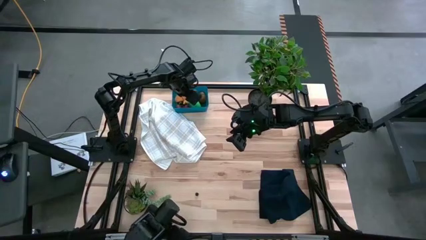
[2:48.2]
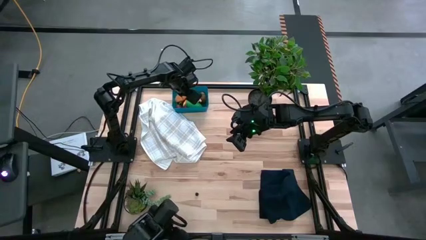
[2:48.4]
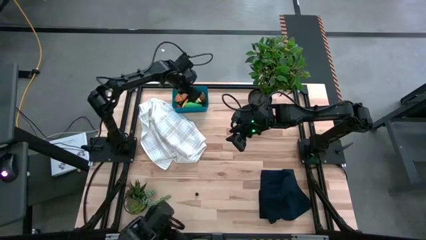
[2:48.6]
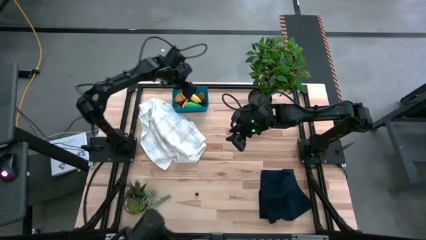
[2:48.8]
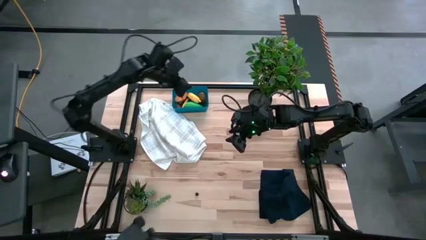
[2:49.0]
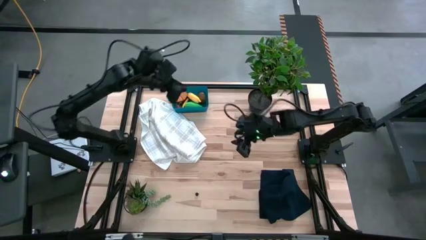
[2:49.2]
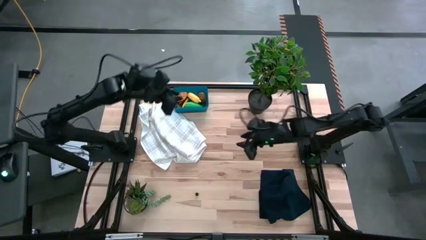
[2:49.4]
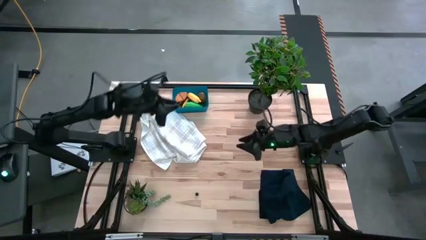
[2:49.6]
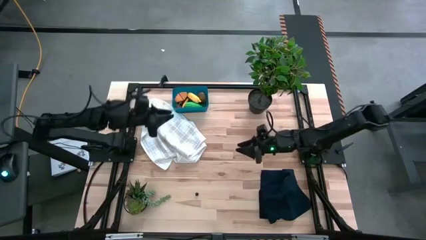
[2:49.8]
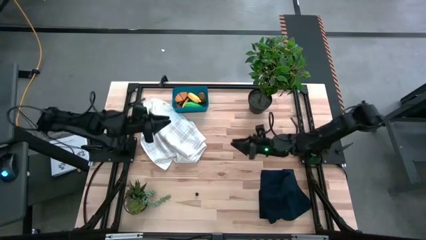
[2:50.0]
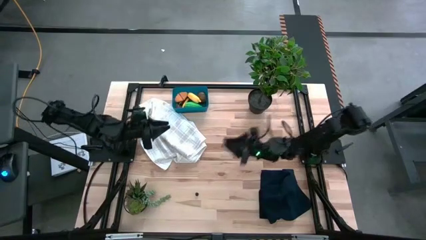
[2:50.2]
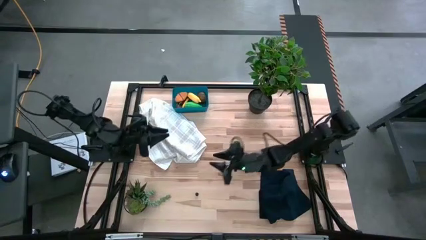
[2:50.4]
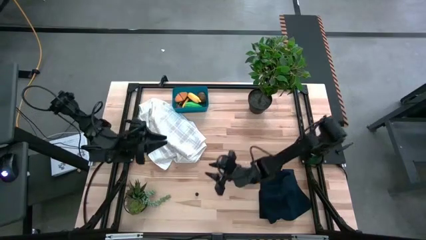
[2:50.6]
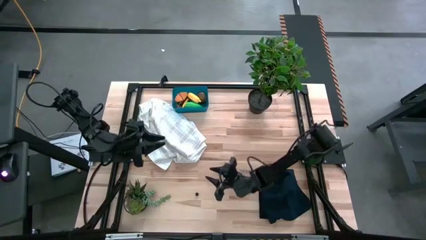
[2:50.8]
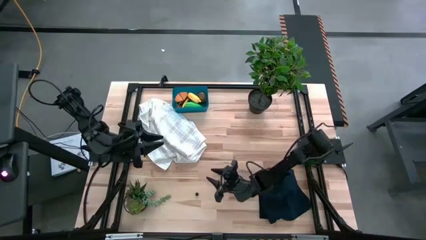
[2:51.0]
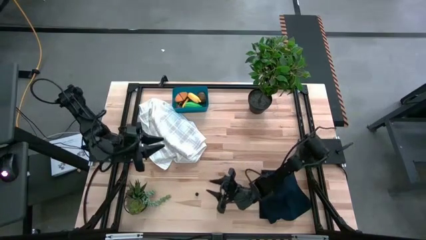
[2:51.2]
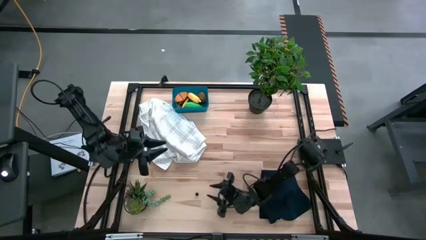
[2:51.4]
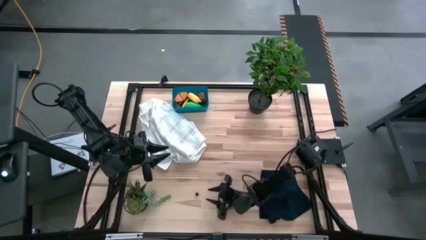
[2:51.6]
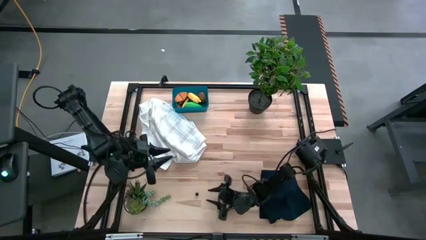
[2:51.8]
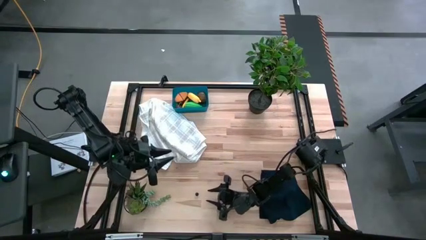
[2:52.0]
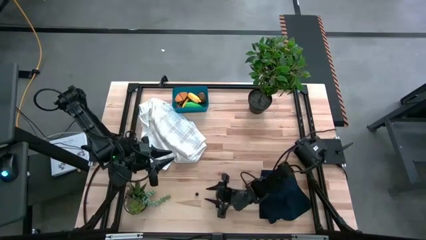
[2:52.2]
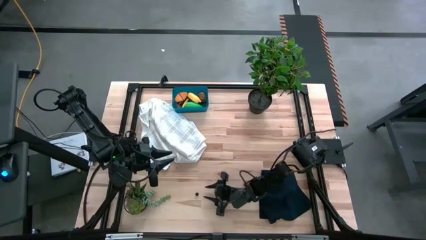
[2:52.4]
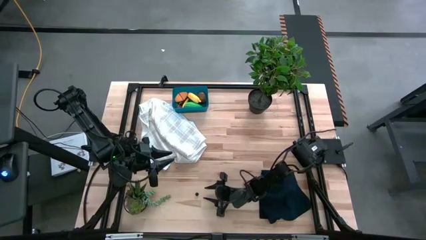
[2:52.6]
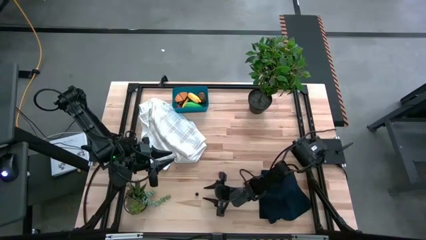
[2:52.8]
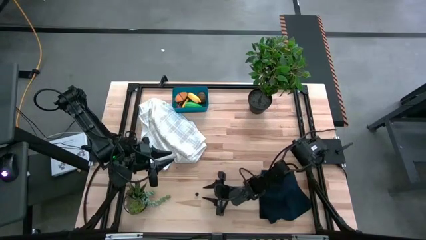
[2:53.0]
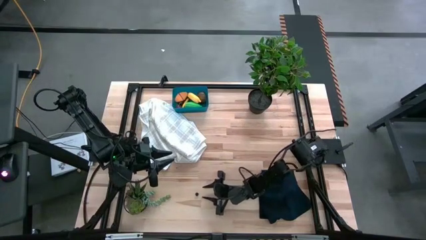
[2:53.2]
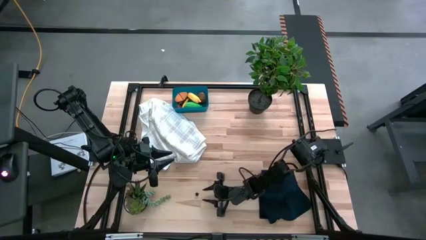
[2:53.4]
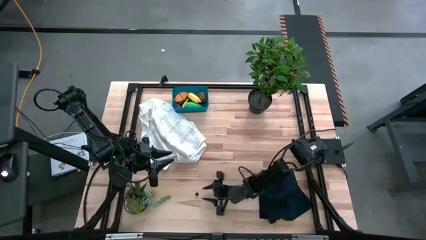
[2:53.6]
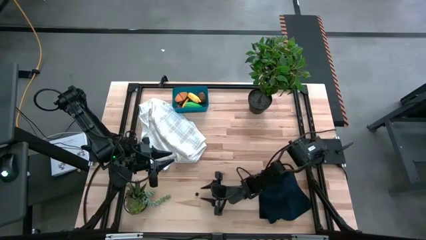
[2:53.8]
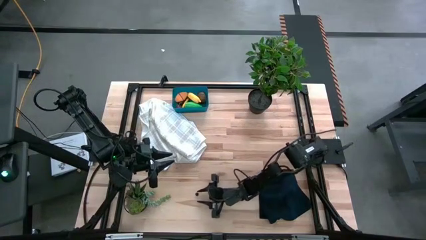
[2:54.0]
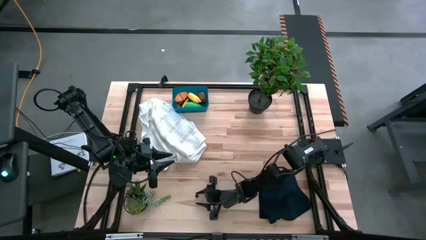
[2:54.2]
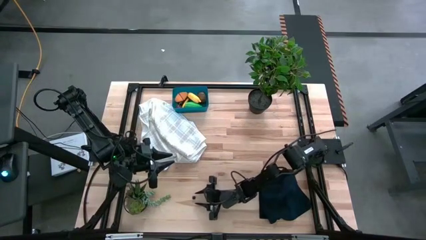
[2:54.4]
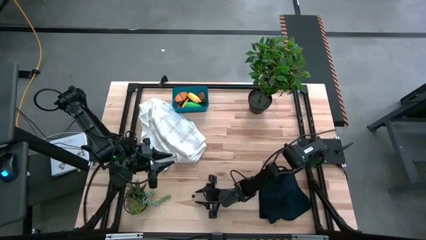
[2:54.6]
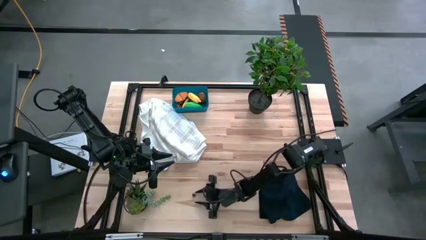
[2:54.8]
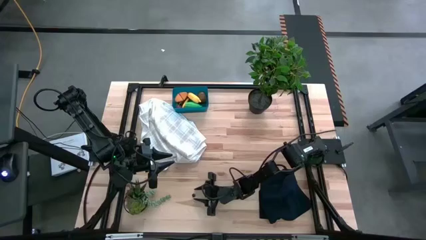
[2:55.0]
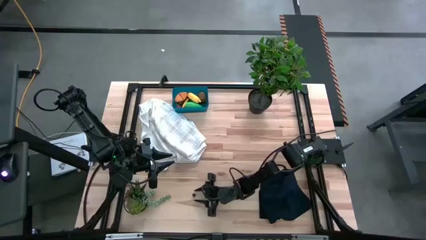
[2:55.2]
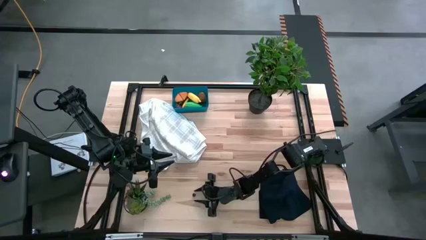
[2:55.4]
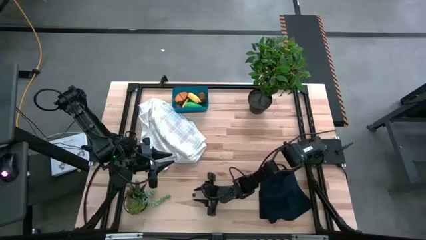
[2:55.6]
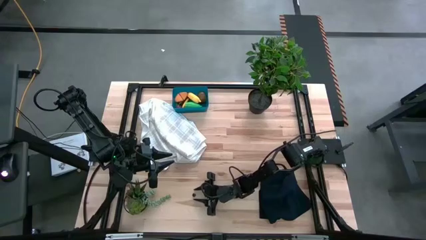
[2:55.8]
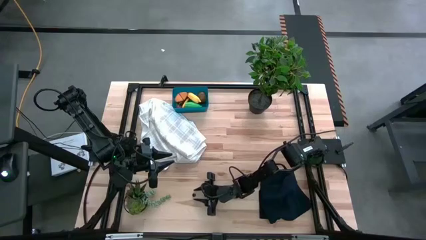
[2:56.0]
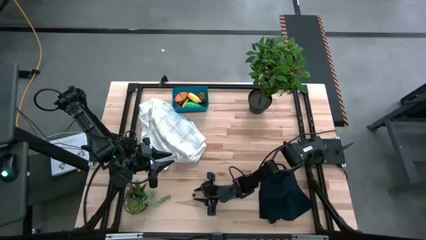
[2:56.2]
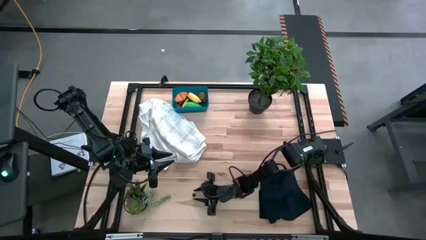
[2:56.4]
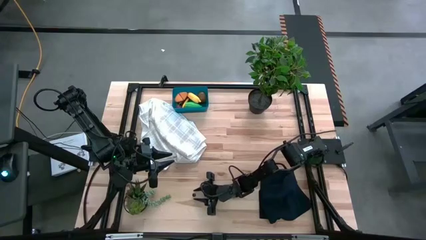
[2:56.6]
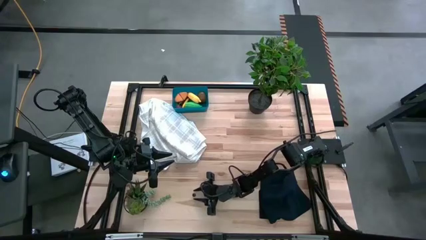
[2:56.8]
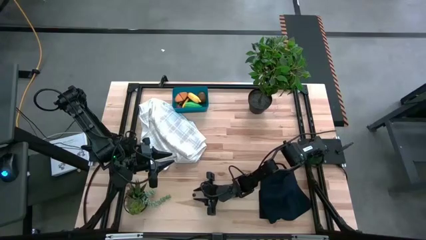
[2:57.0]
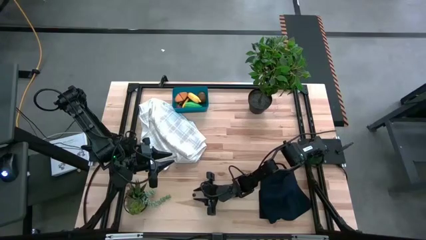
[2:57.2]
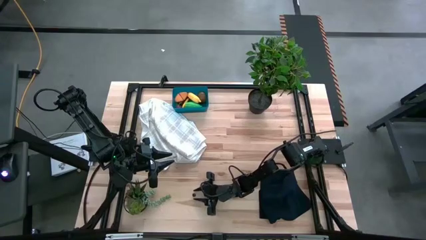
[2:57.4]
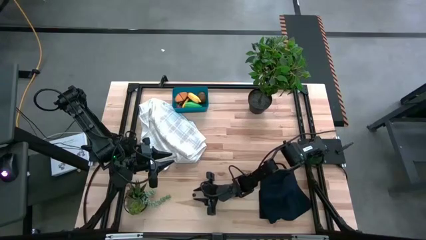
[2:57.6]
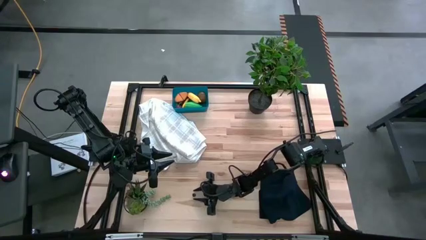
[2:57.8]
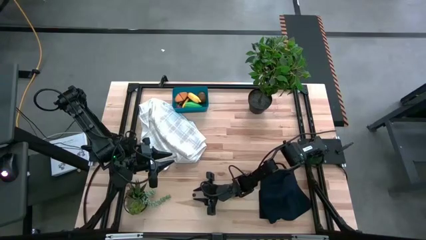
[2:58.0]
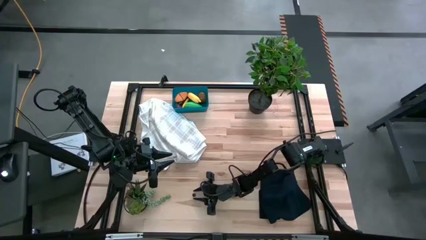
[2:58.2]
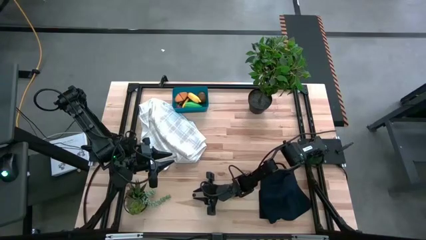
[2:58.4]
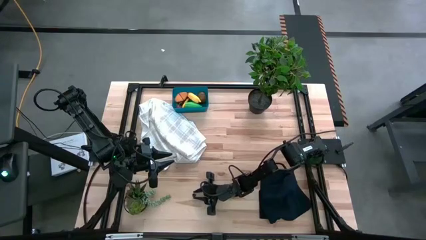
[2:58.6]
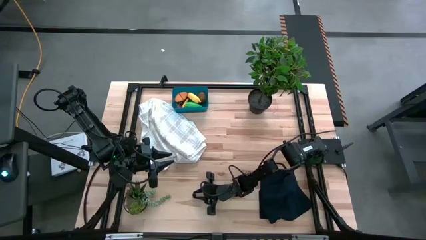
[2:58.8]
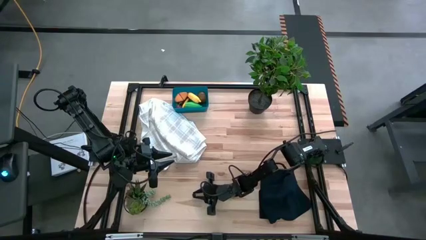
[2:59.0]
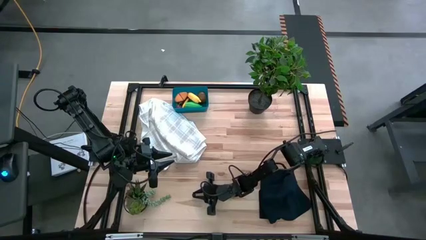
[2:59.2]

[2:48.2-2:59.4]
Task: Pick and placing Produce into tupperware
Put the blackberry into the blue bin
